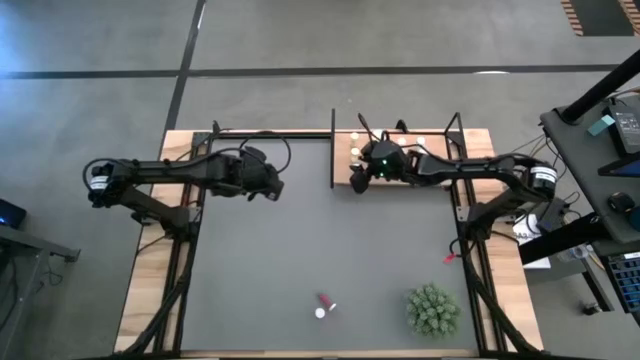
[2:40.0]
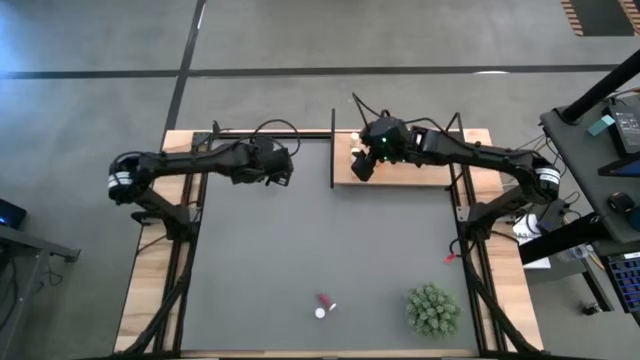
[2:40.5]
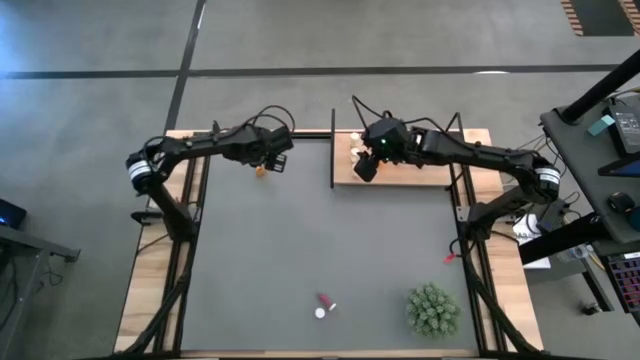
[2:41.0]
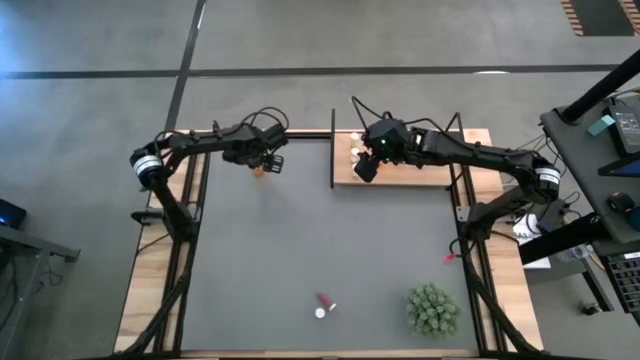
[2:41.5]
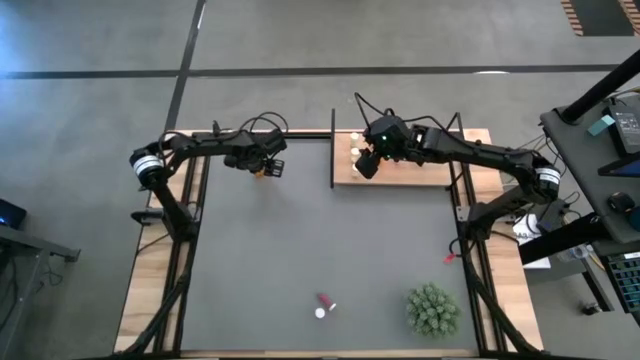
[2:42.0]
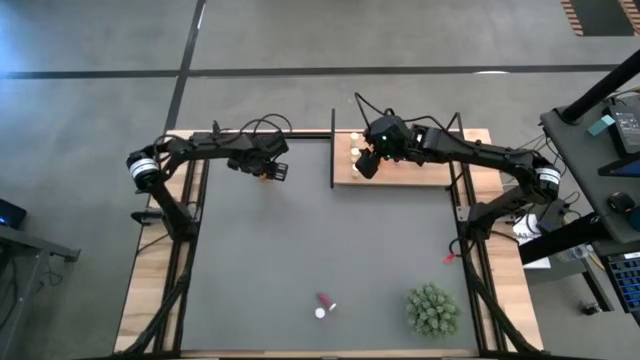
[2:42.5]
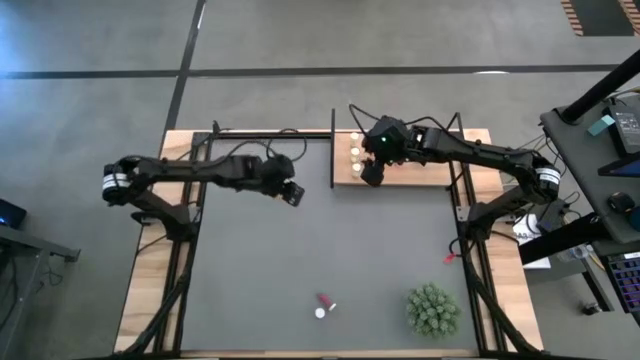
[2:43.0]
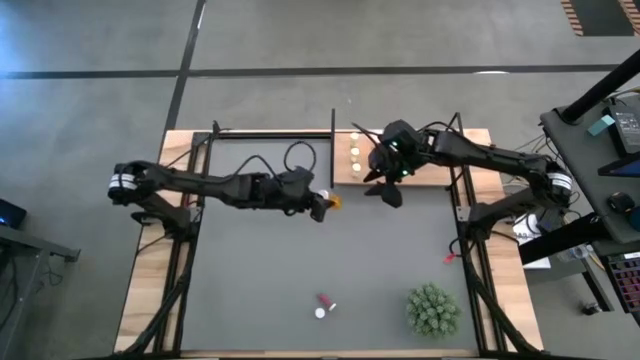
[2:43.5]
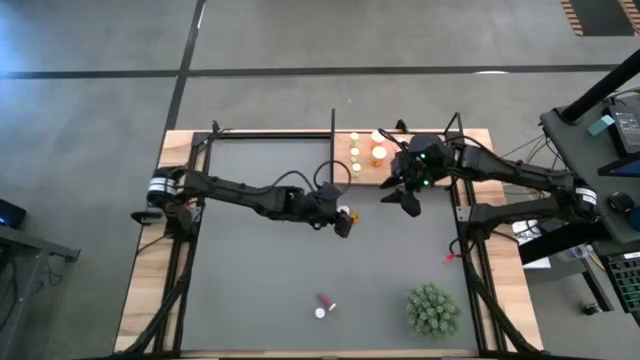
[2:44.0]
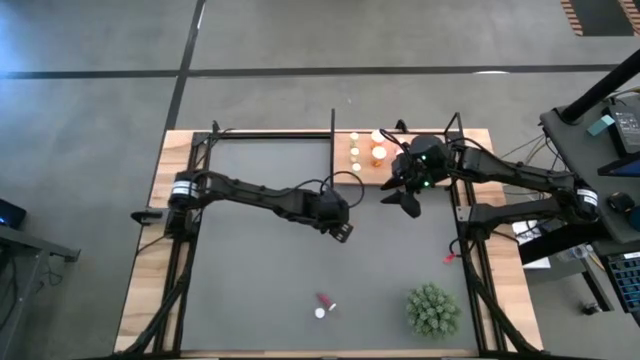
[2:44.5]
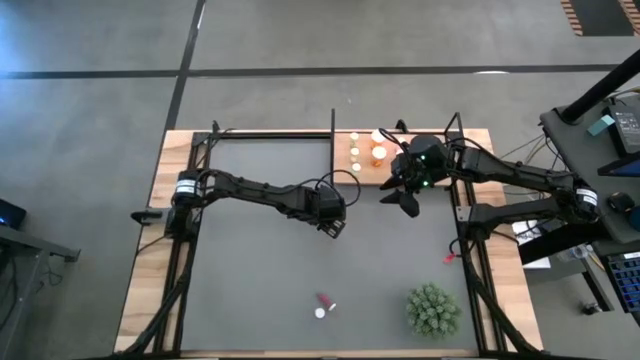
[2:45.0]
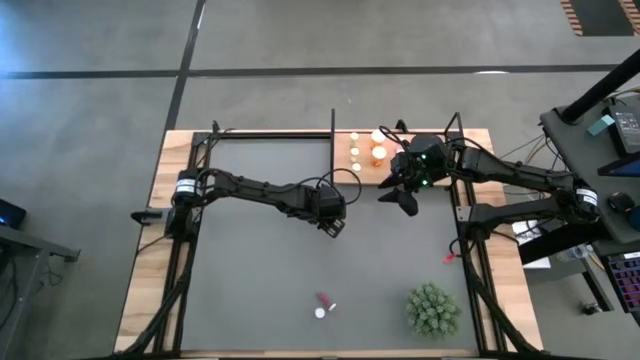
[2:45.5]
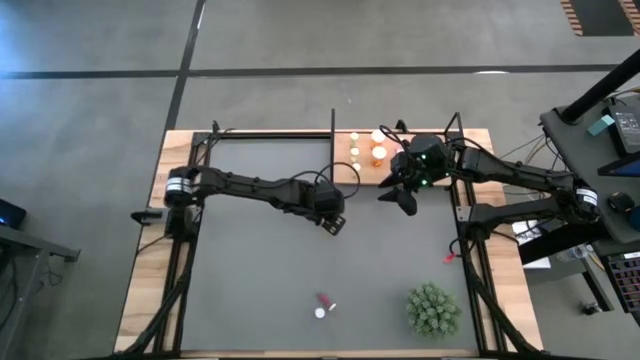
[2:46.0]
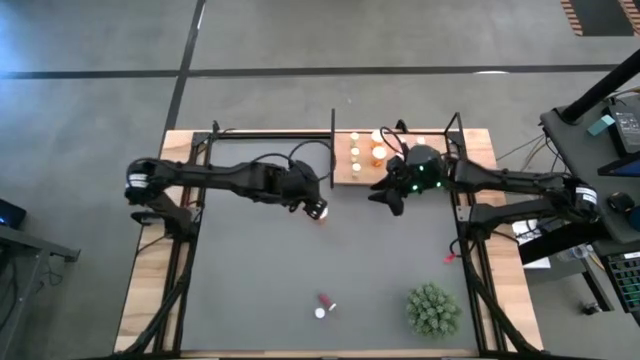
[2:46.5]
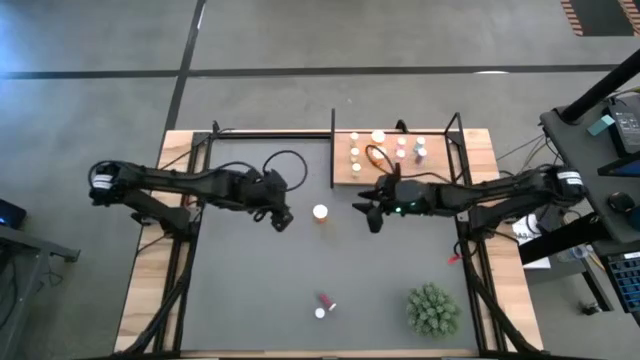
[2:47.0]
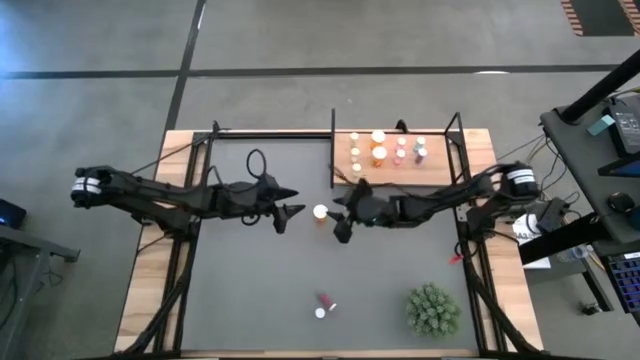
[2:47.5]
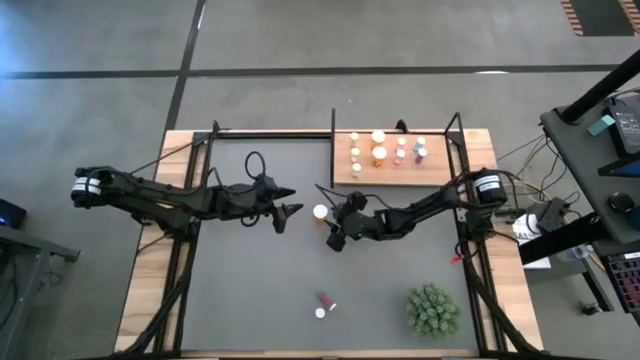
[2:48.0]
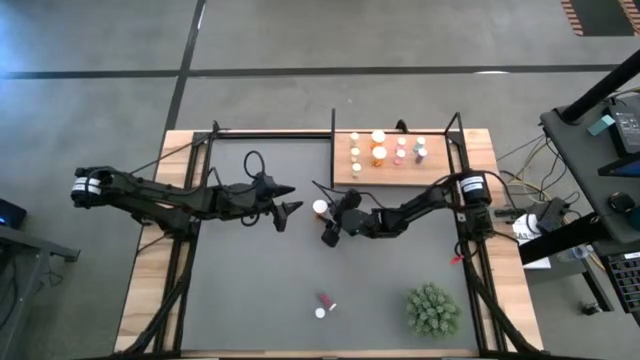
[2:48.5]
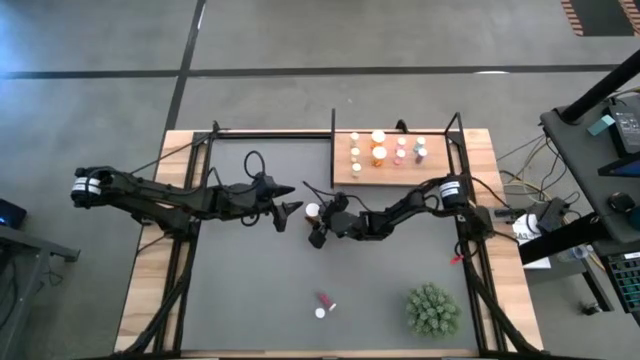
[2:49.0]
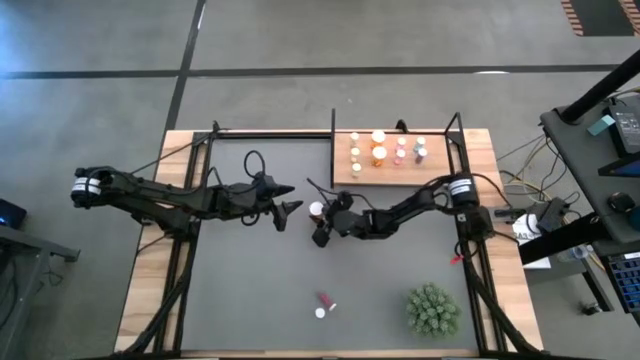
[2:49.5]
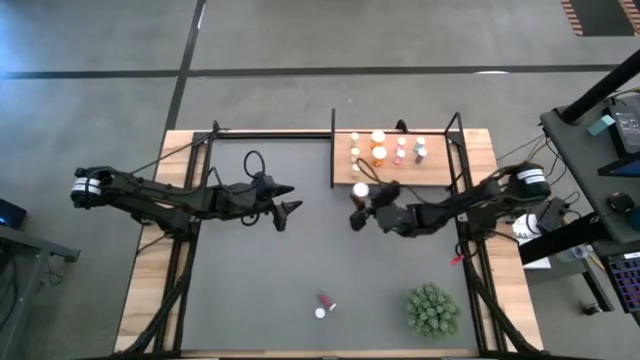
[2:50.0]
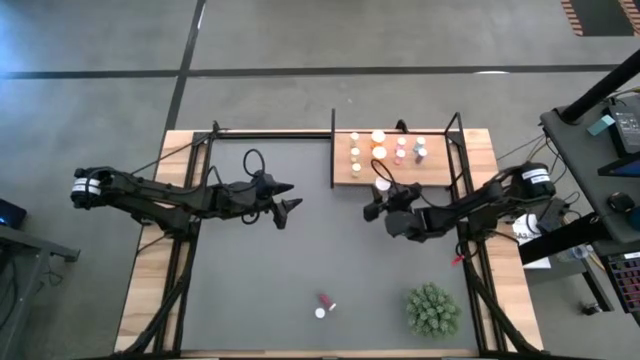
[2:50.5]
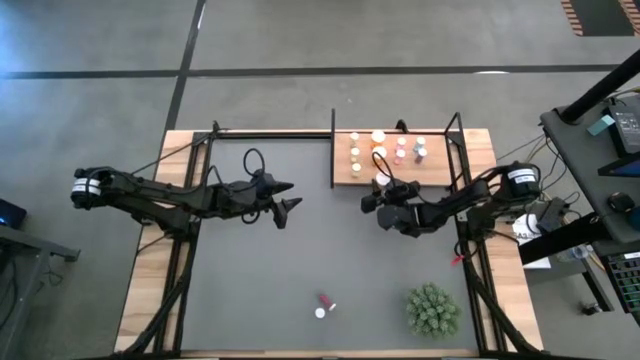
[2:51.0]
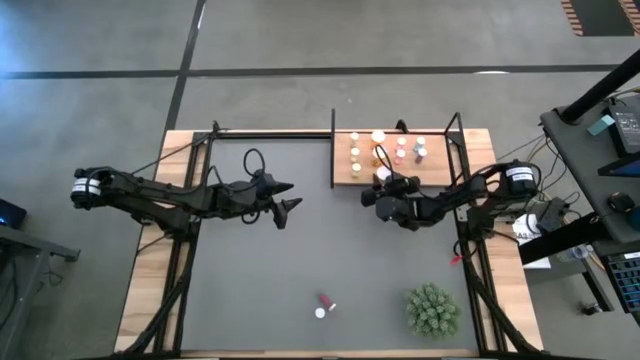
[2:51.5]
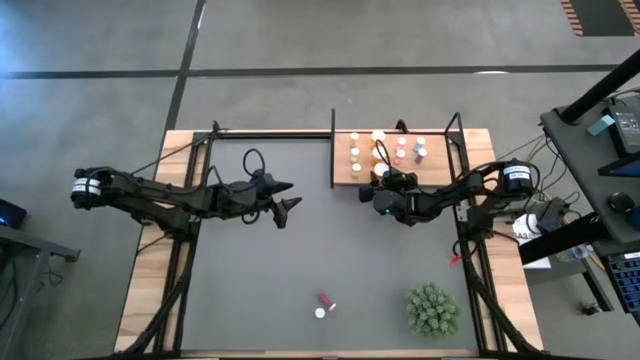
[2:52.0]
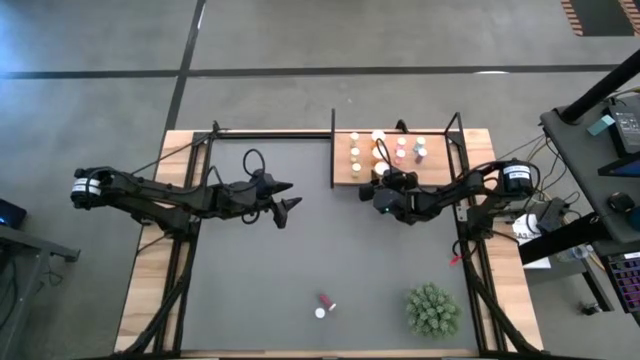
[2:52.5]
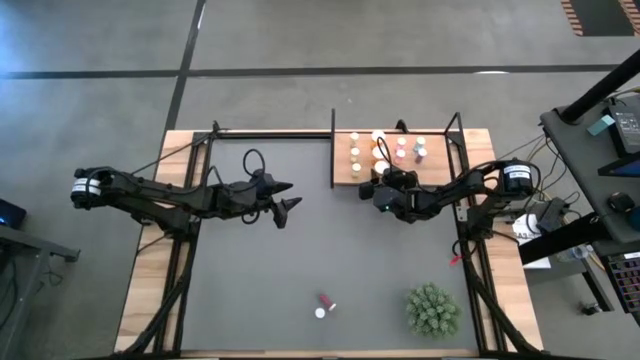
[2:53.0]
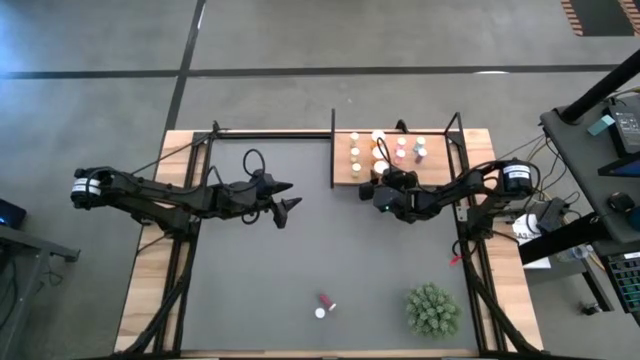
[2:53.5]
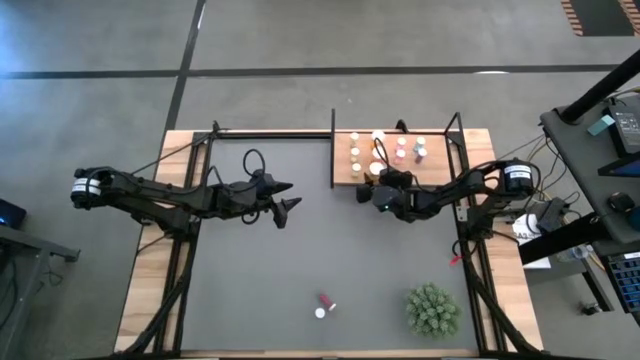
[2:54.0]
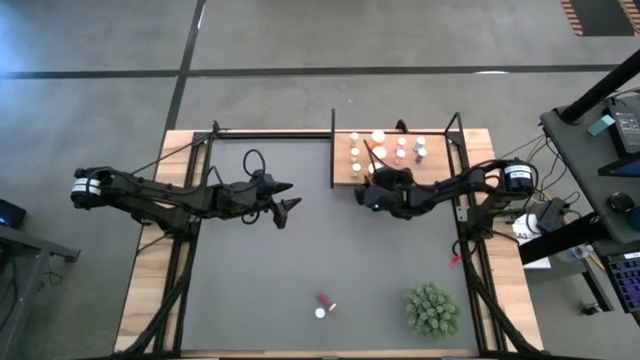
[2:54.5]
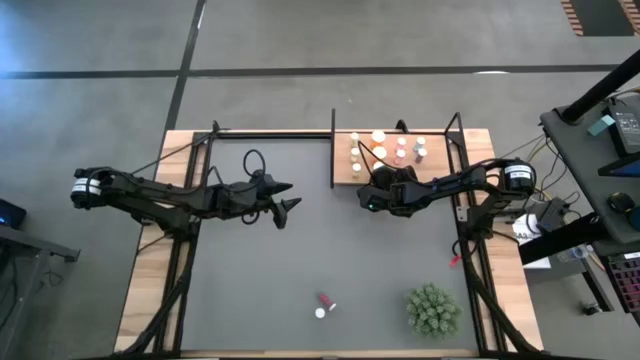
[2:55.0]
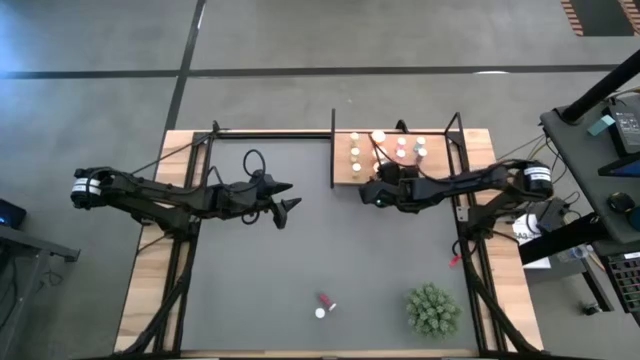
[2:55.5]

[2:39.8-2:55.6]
Task: Pick and place medicine bottles onto shelf by color
Put the orange medicine bottle on the shelf aligned with the other orange medicine bottle

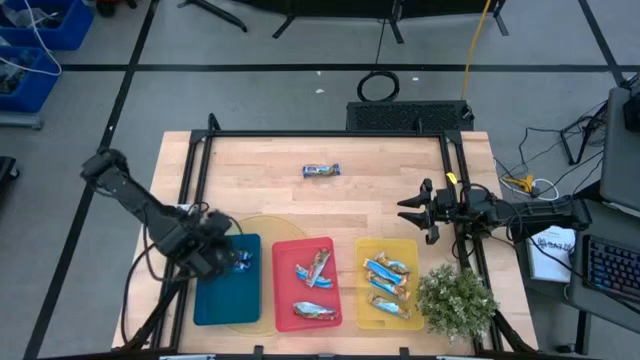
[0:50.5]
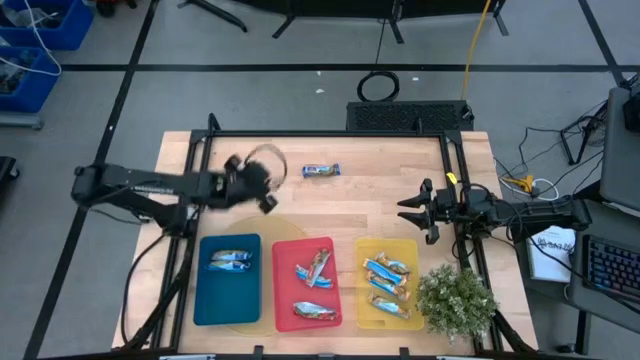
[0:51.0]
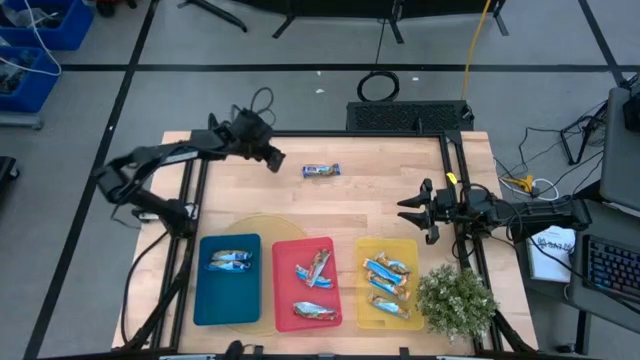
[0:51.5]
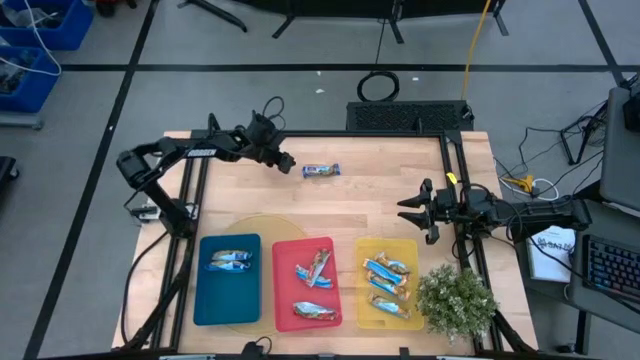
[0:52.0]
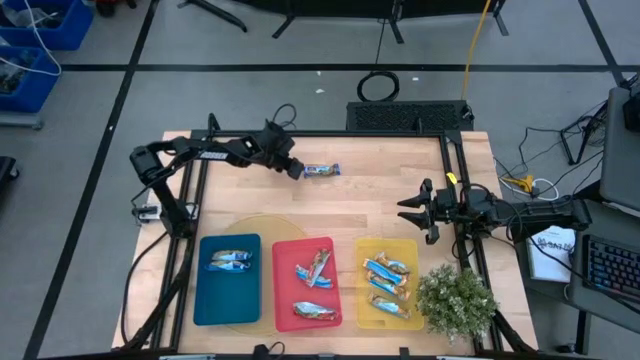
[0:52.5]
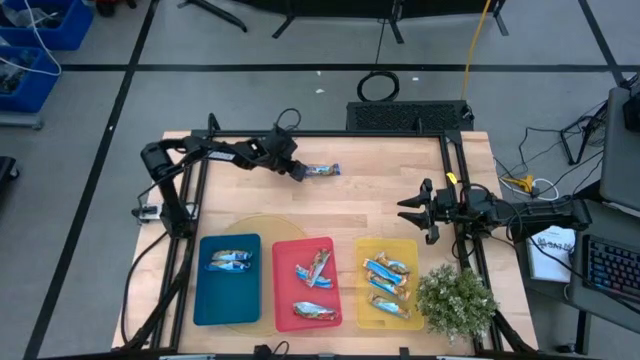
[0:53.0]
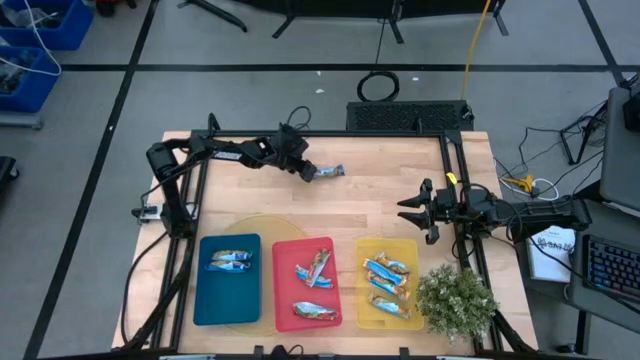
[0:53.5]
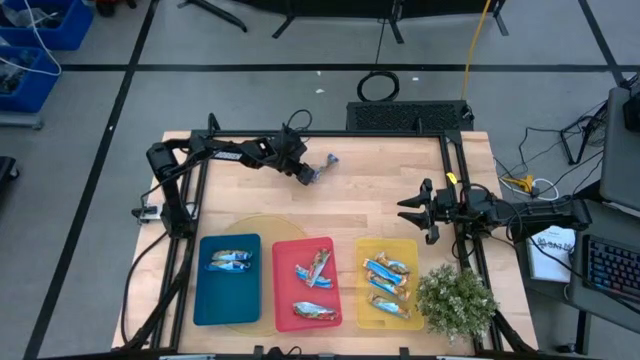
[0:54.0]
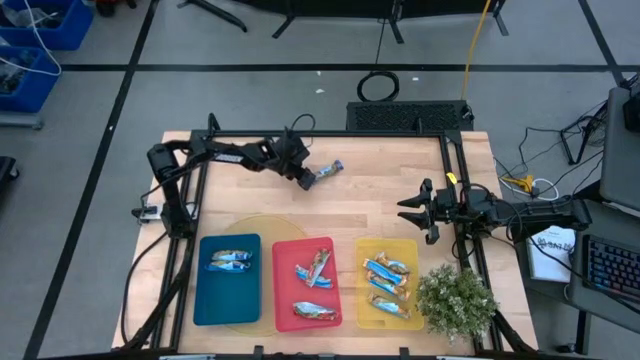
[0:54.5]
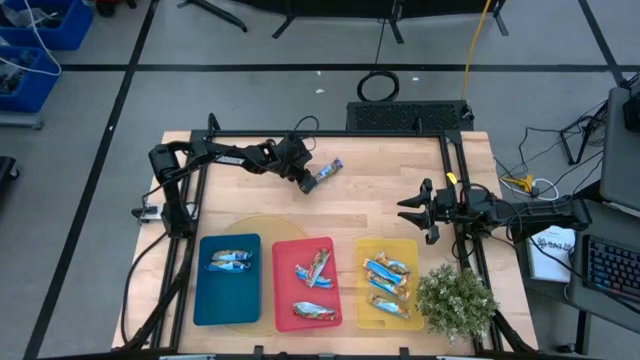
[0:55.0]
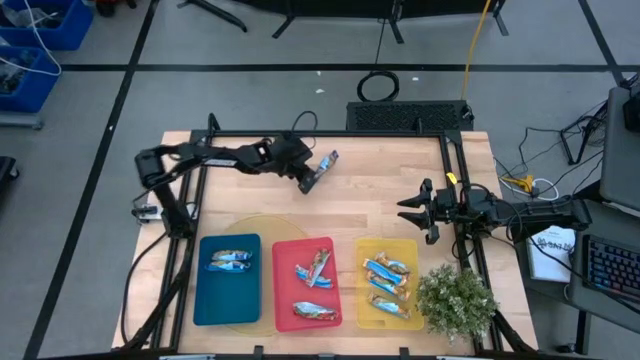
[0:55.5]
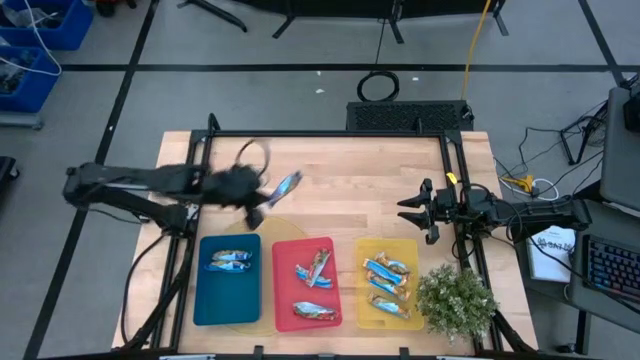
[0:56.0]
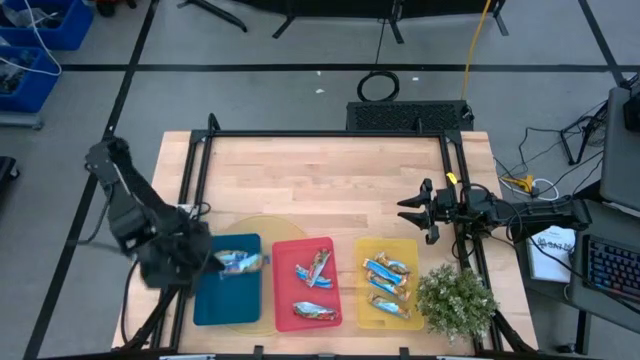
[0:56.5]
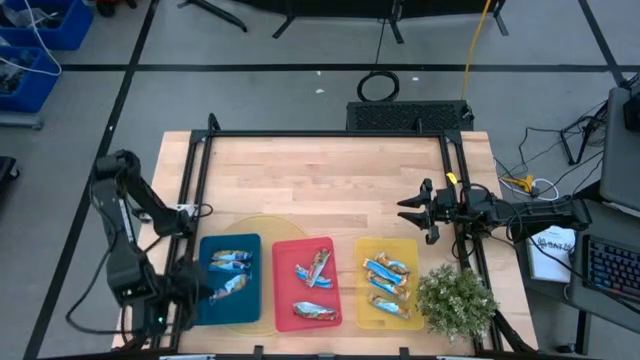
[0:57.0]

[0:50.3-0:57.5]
Task: Pick and place Granola Bars by type
Put the blue granola bar into the blue bin
